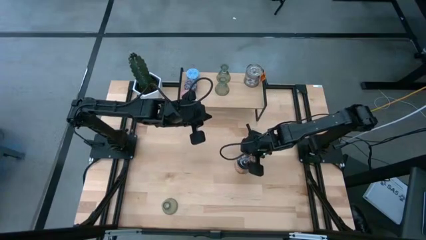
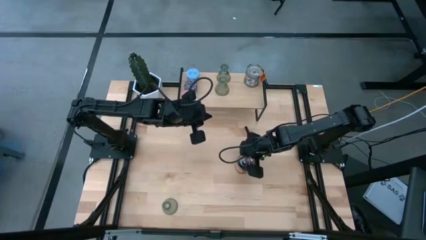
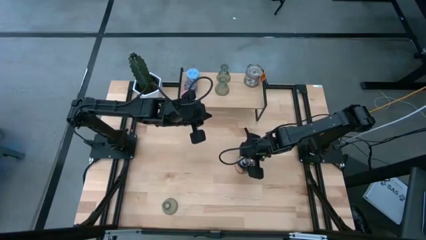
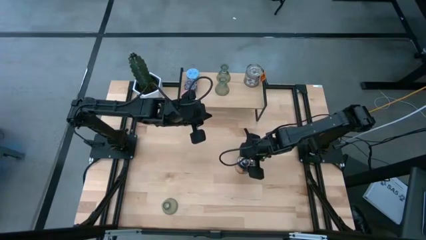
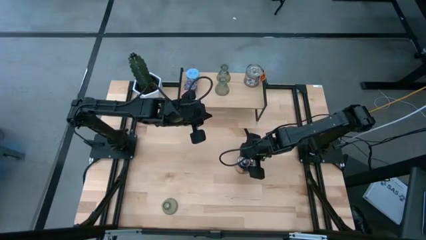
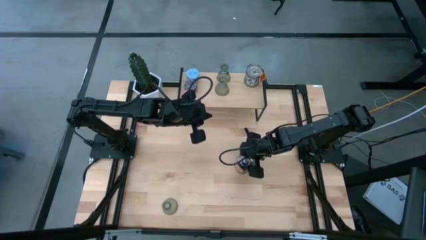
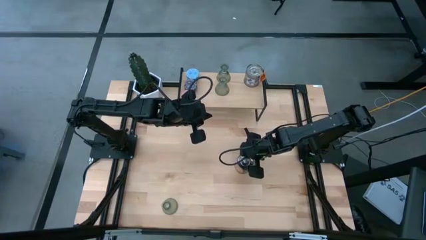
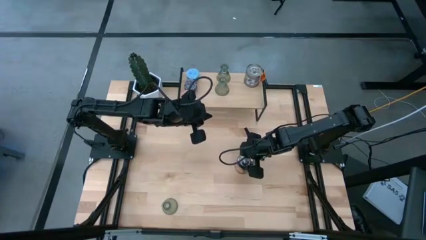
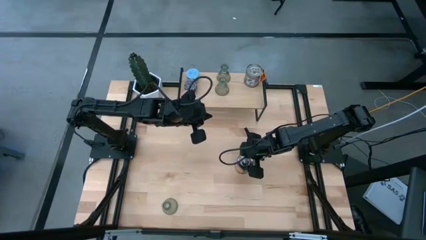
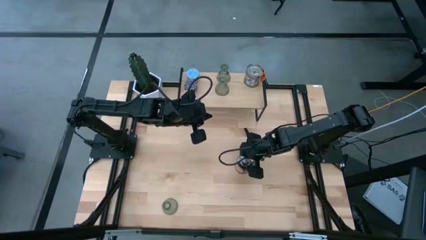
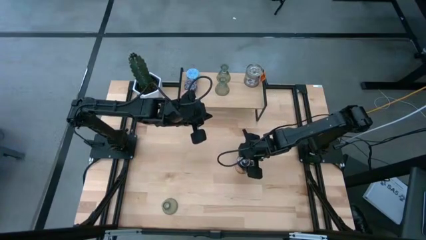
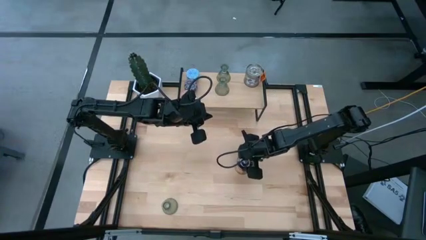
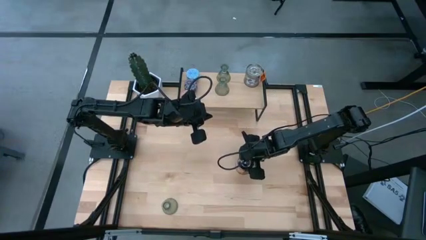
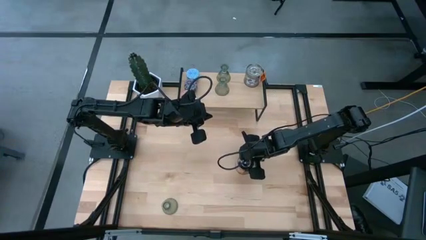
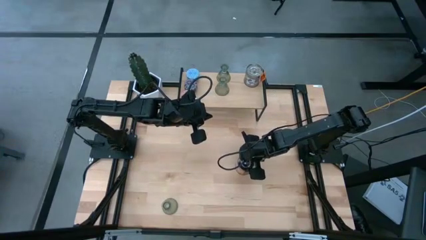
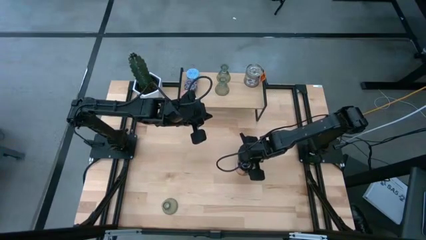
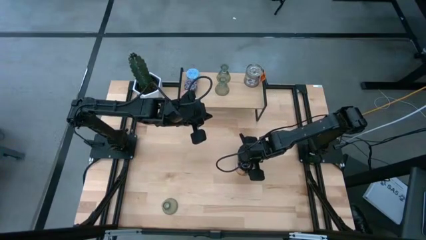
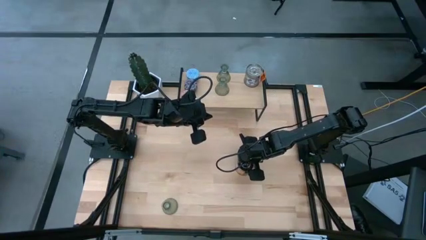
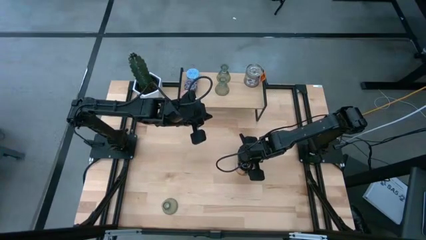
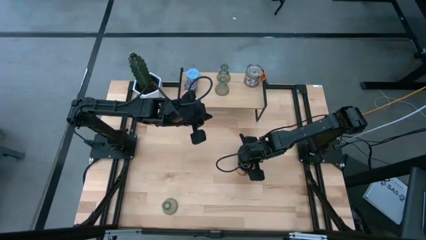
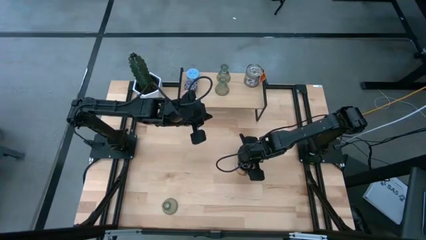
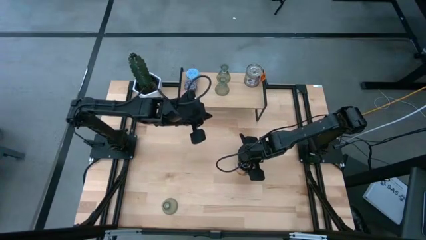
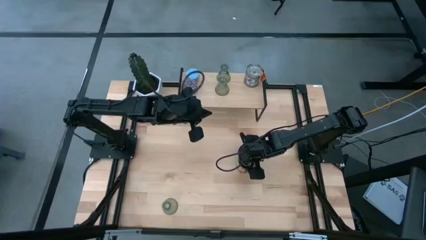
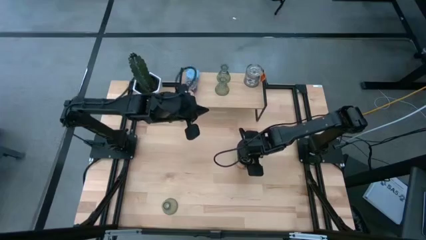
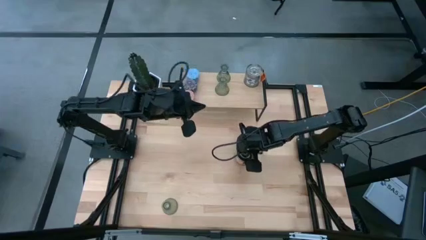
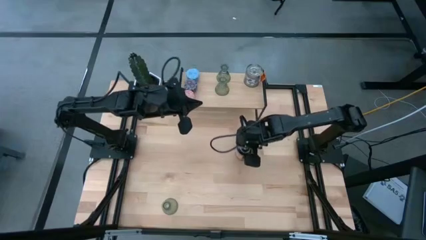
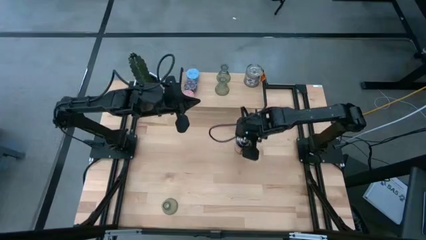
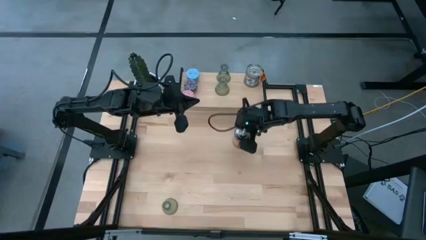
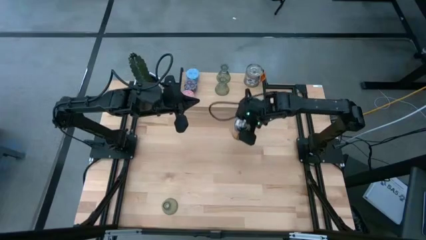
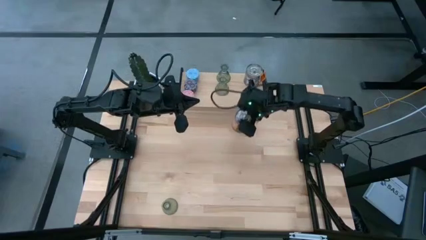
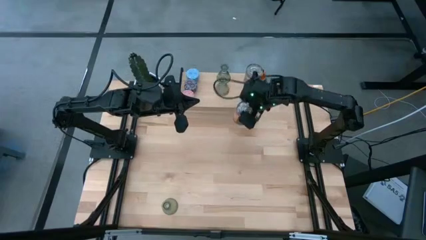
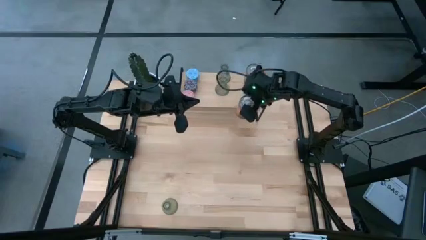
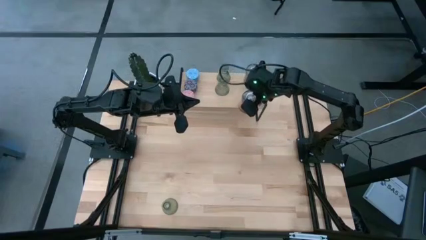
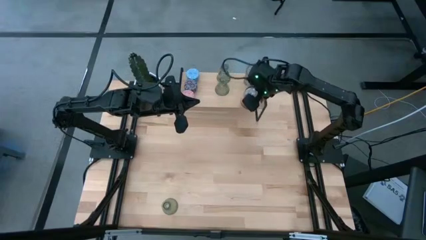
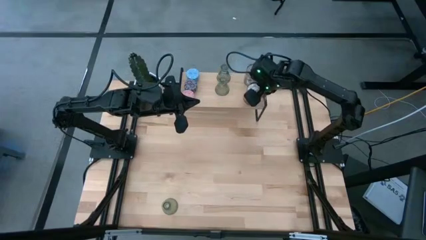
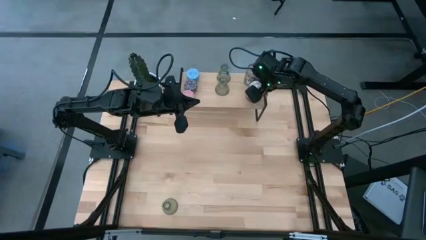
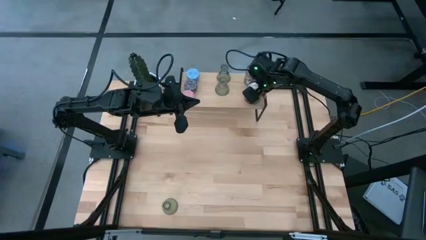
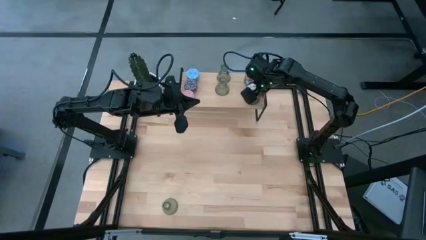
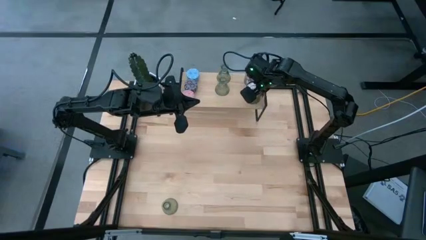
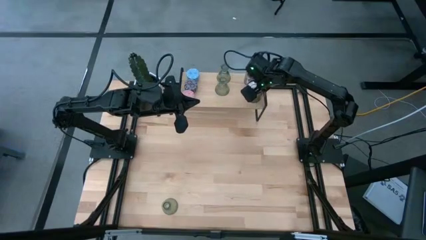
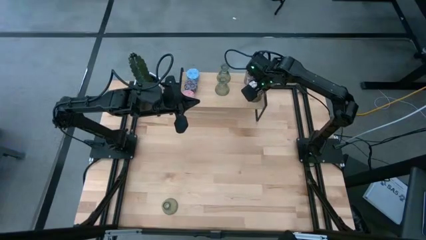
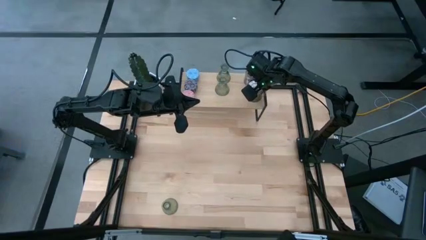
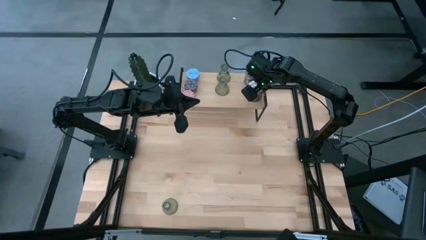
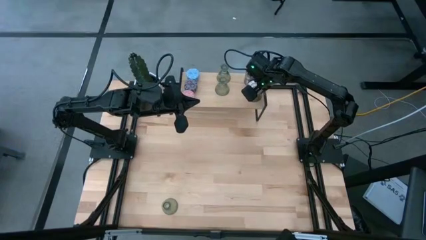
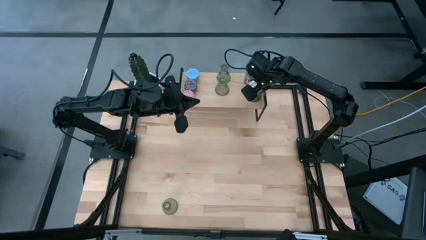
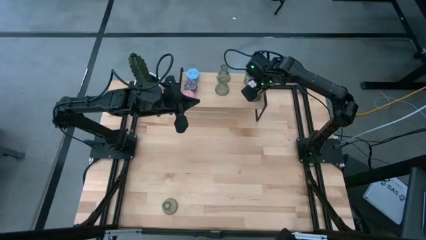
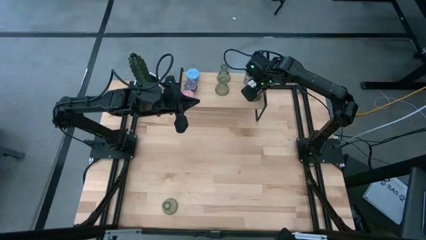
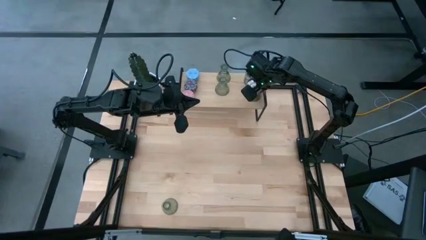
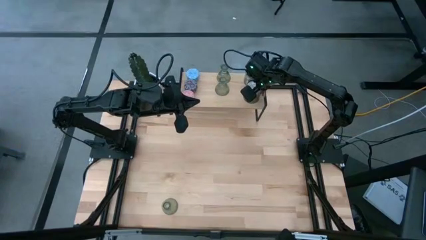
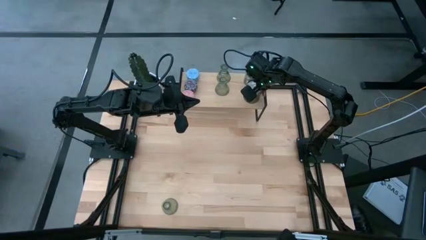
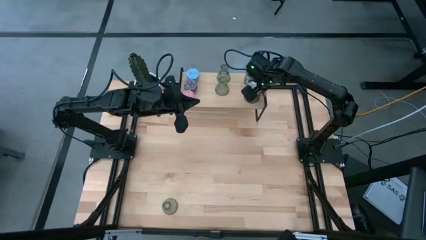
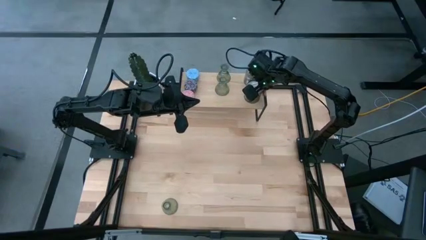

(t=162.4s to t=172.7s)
Task: Pick & Place candle stick holders
Put the silver scented candle aligned with the silver scented candle on the shelf
